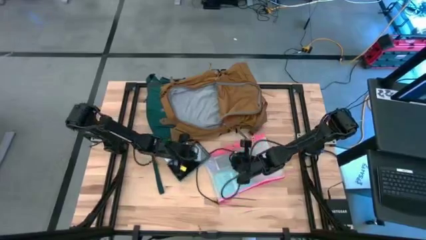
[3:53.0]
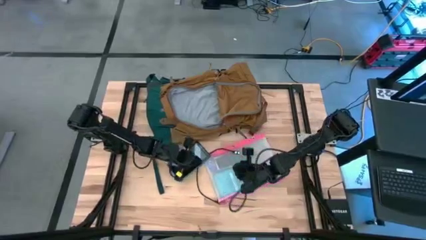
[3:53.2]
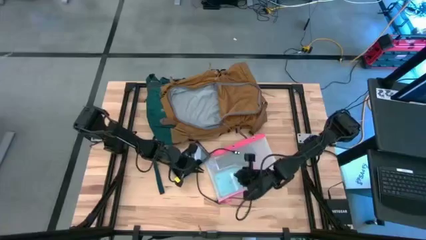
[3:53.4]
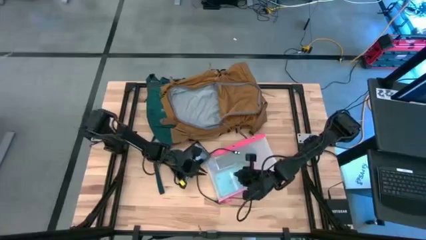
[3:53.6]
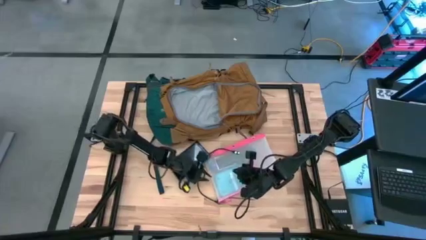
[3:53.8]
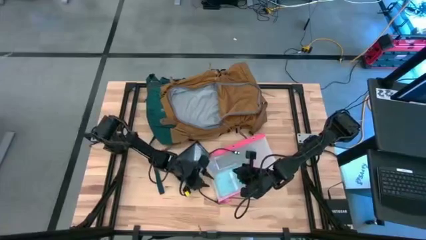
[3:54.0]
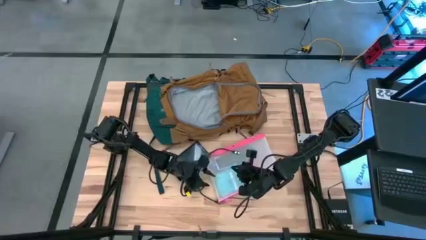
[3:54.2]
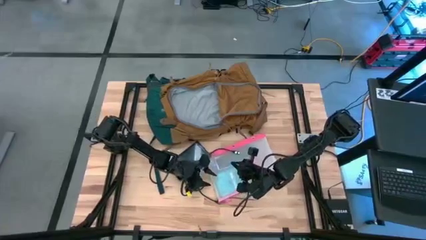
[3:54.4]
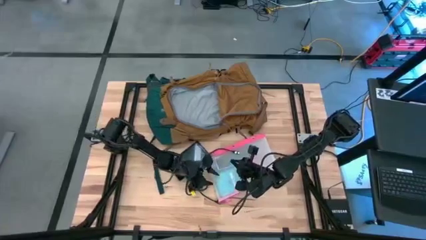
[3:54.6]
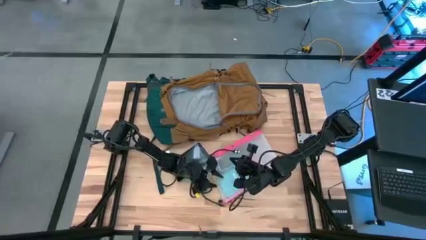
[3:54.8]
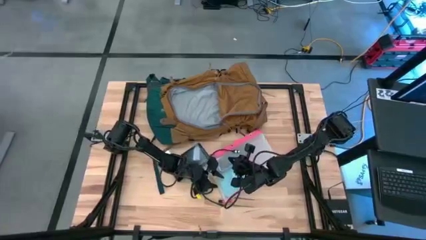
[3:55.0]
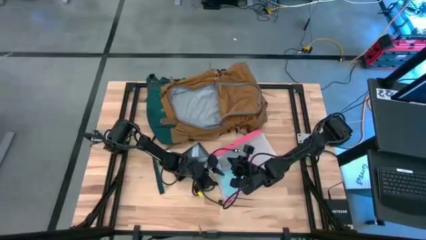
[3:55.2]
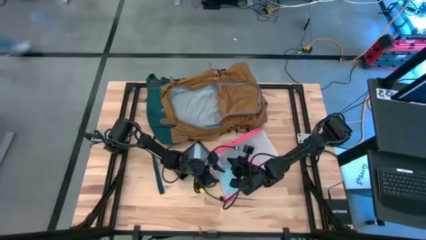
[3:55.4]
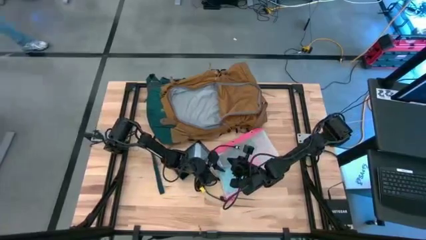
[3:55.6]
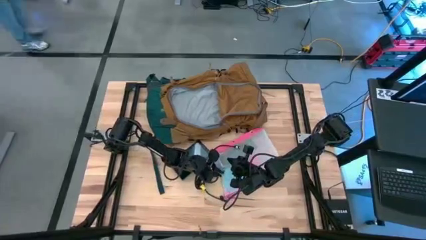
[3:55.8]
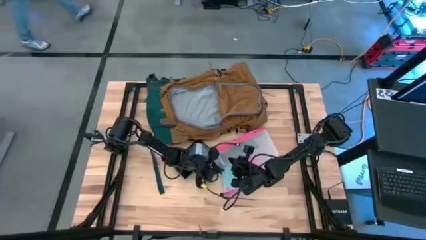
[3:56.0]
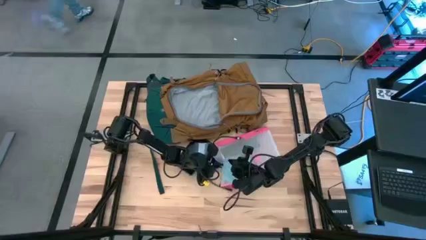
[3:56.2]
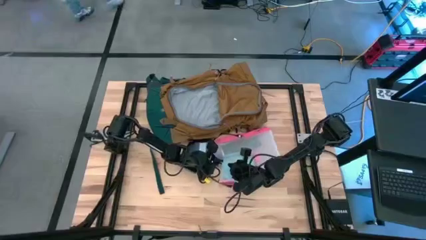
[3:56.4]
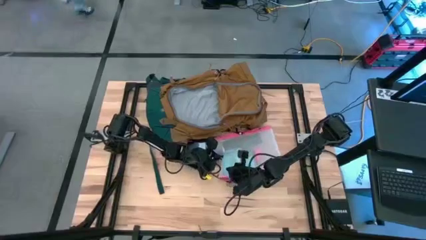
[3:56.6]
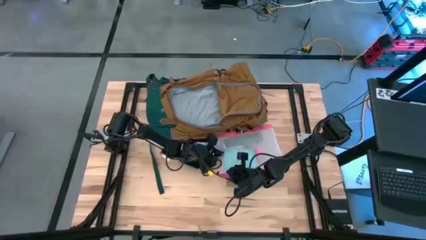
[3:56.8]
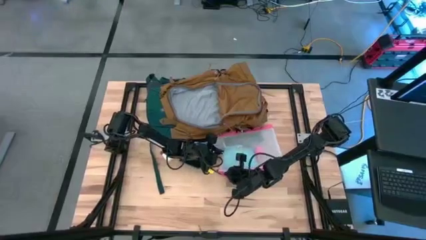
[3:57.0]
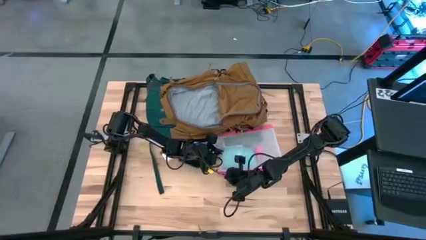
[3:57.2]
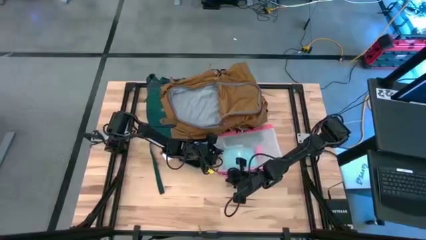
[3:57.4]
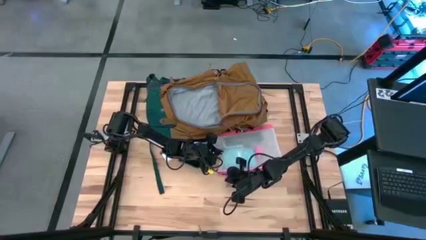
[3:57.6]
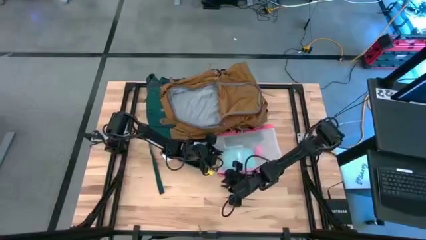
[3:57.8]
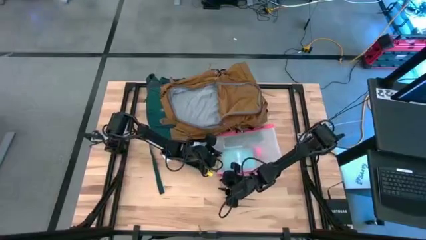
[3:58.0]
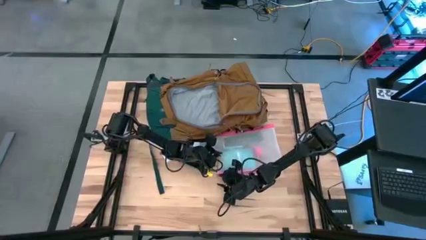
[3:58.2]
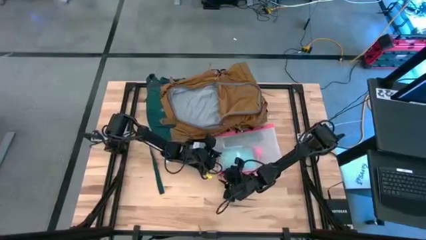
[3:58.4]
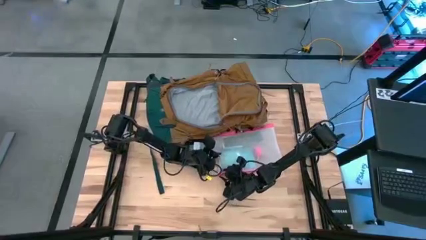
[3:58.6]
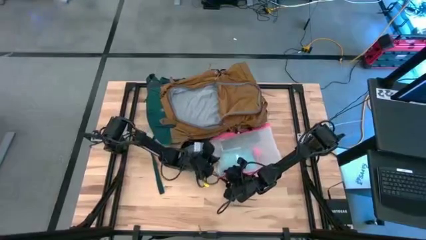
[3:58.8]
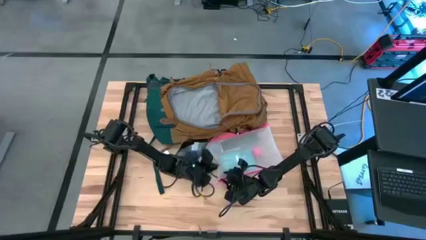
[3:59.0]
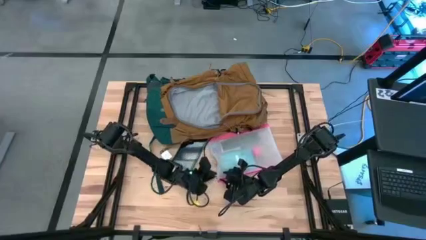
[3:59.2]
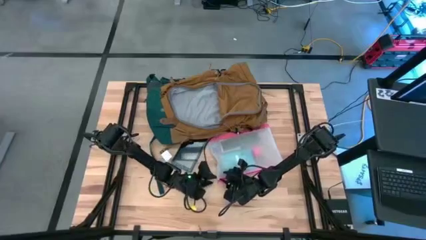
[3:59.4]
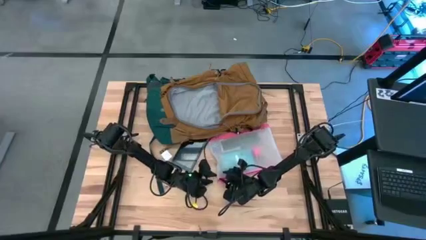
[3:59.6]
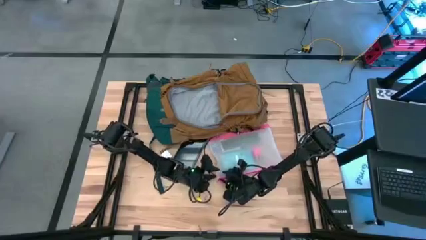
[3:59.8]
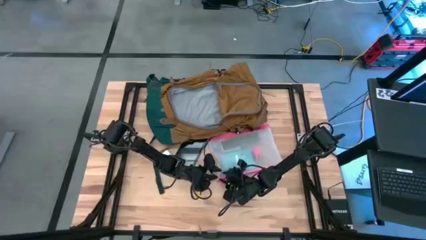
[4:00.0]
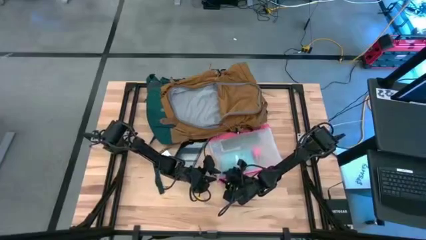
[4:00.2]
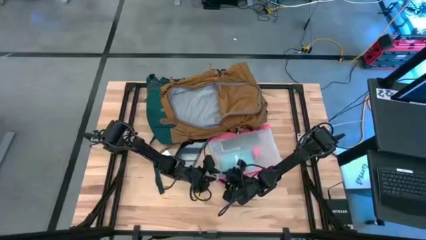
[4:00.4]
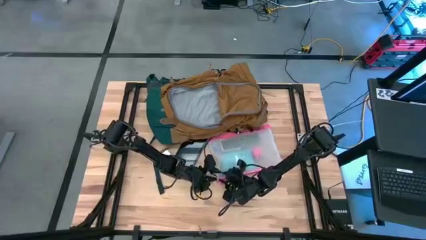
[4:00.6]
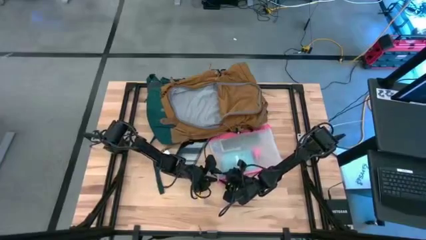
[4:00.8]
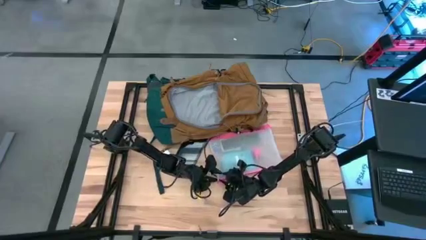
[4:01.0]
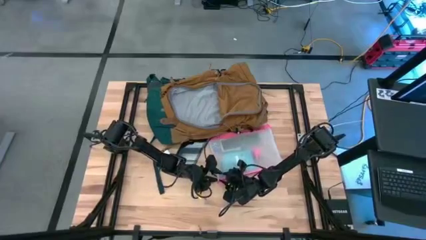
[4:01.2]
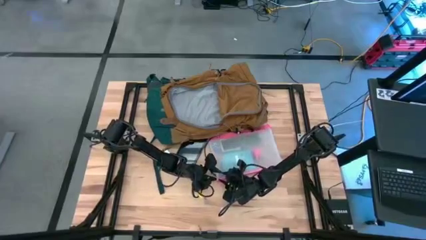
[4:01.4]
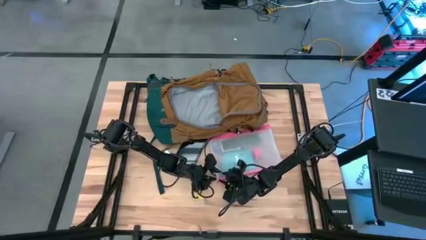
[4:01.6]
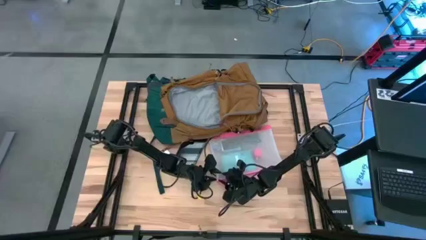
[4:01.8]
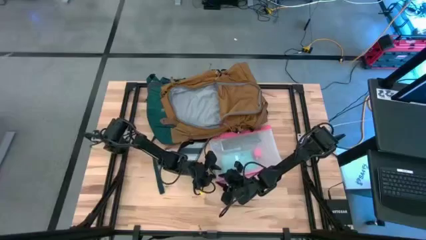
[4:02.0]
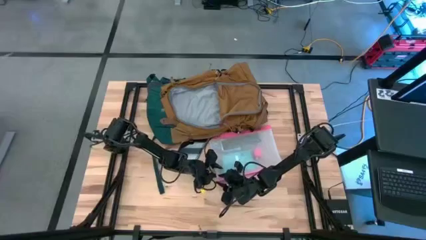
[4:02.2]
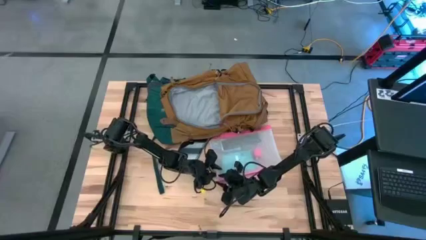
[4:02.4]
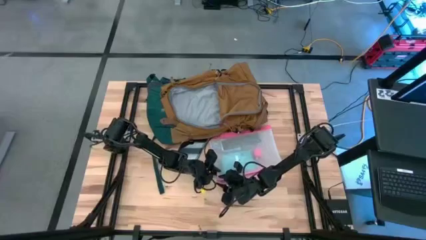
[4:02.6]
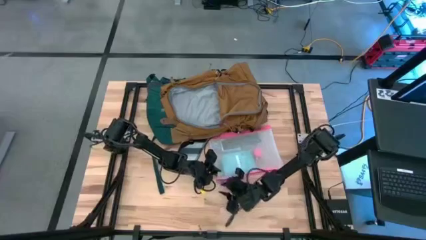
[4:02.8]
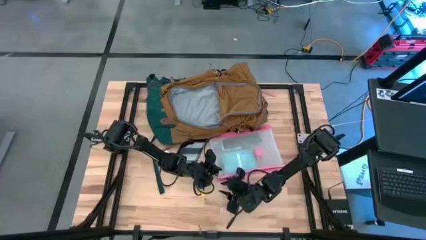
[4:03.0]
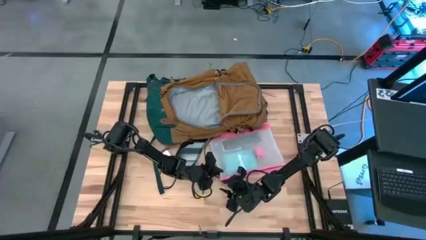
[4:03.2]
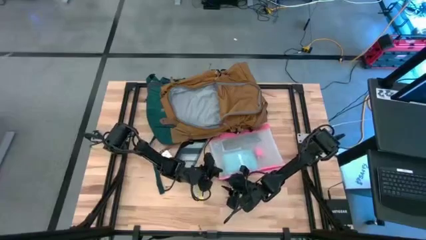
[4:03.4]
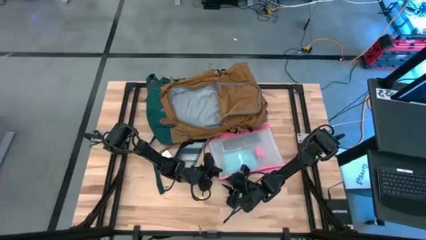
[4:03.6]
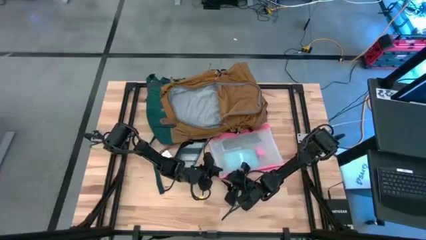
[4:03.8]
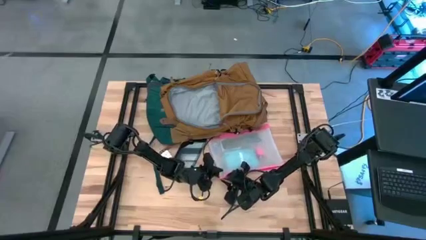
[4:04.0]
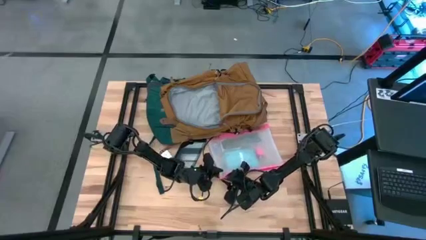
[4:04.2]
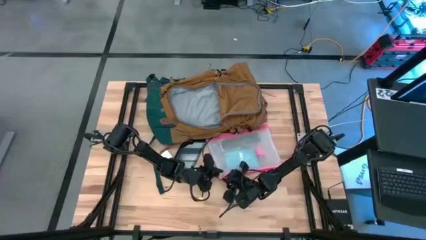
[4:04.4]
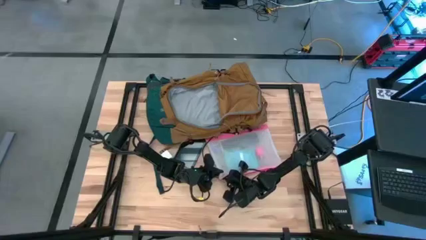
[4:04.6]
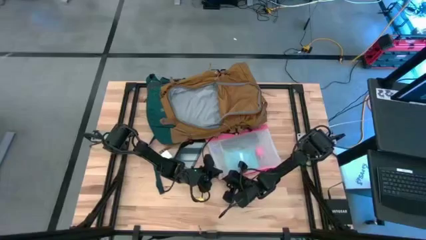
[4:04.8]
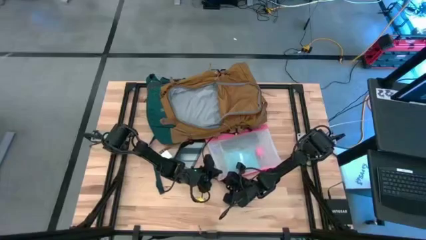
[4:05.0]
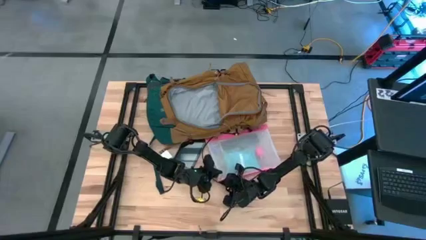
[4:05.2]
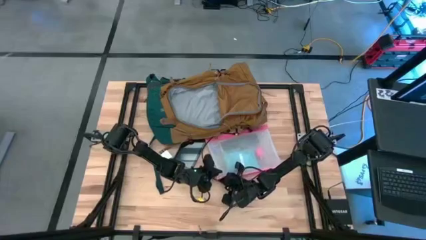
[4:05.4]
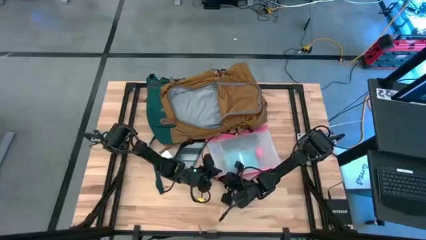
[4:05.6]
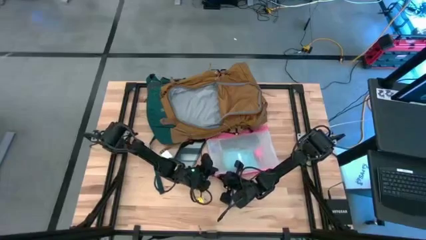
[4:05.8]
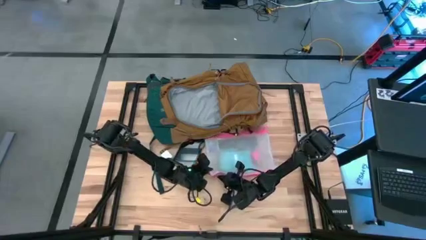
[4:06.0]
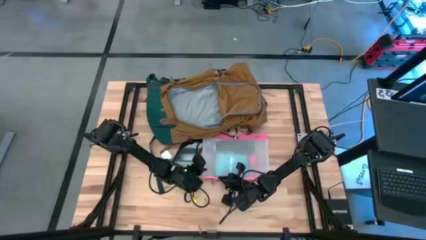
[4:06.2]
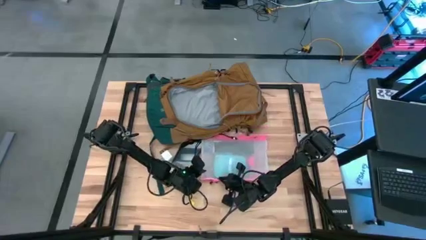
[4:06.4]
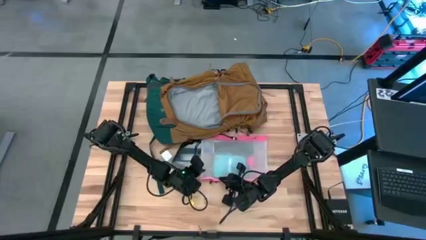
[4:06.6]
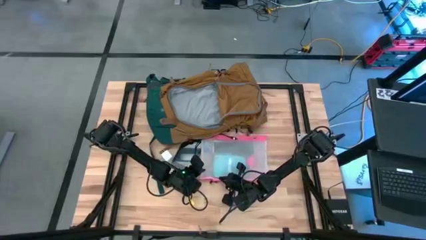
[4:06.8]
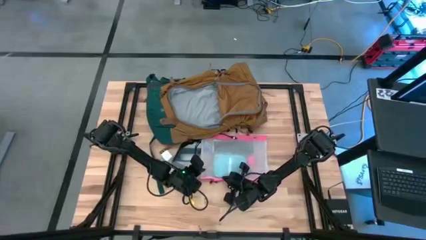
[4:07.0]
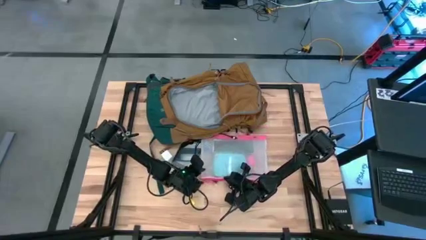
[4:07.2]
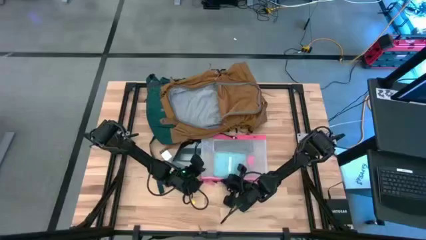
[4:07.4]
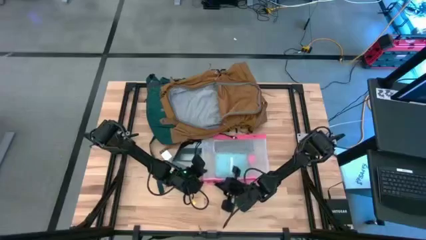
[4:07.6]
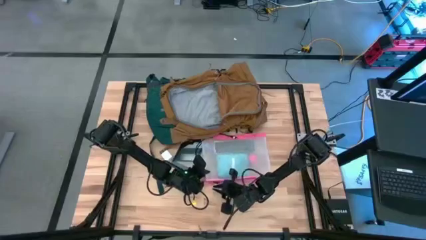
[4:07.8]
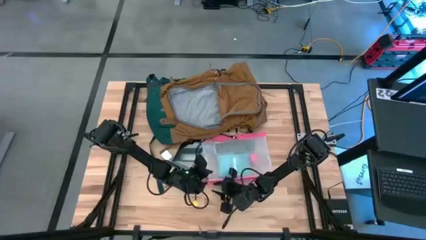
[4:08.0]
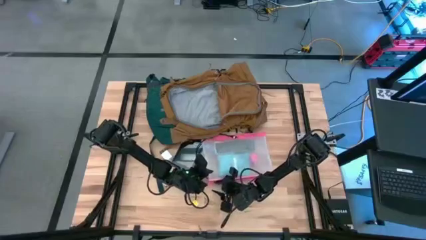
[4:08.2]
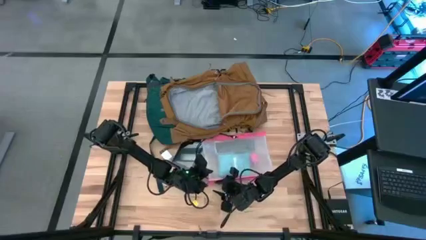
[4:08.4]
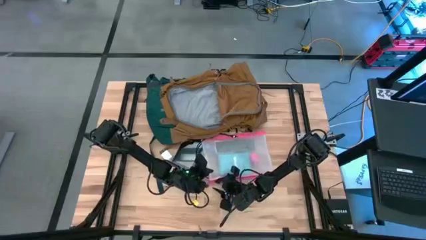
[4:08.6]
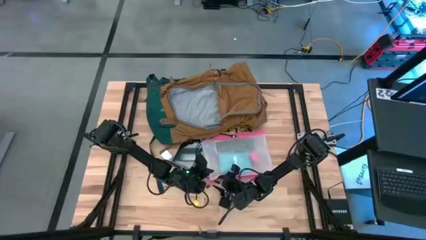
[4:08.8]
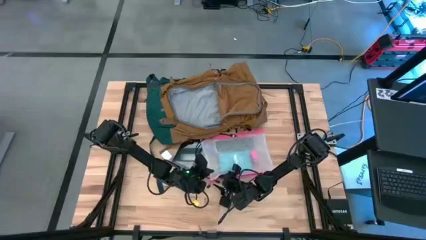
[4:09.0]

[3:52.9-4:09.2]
Task: Unpack backpack
Open the pink zipper pouch
